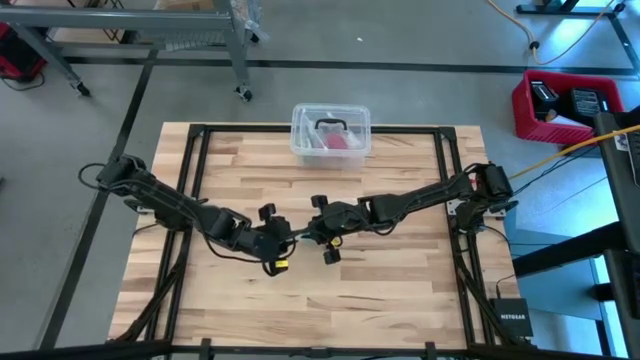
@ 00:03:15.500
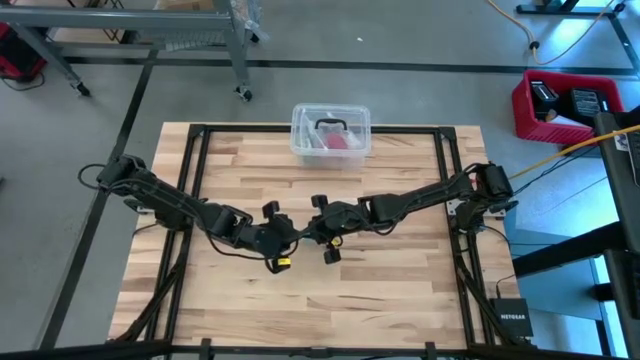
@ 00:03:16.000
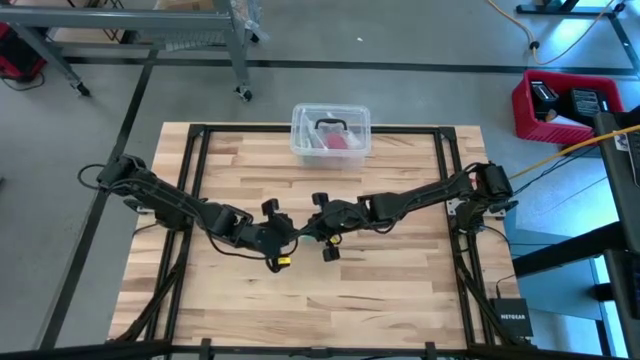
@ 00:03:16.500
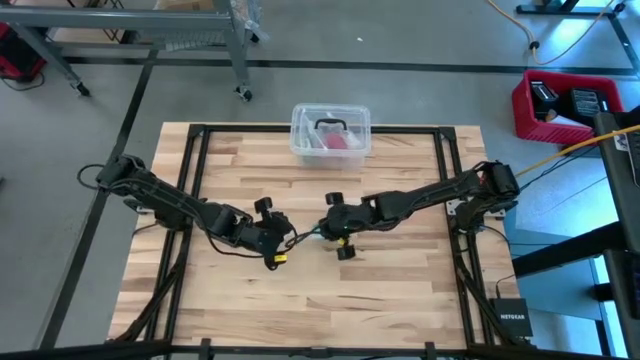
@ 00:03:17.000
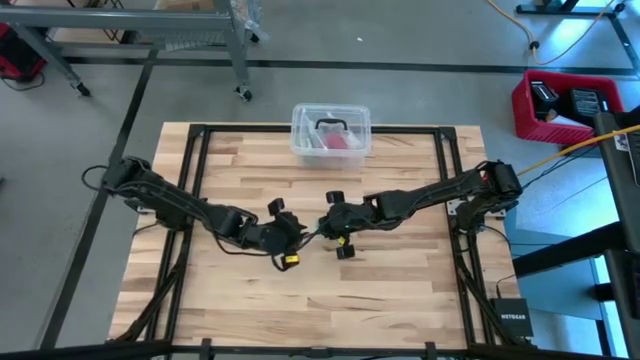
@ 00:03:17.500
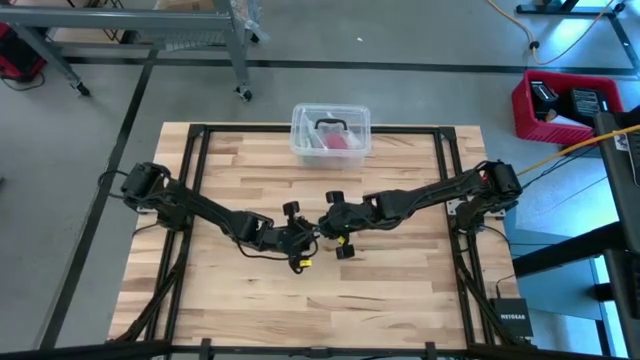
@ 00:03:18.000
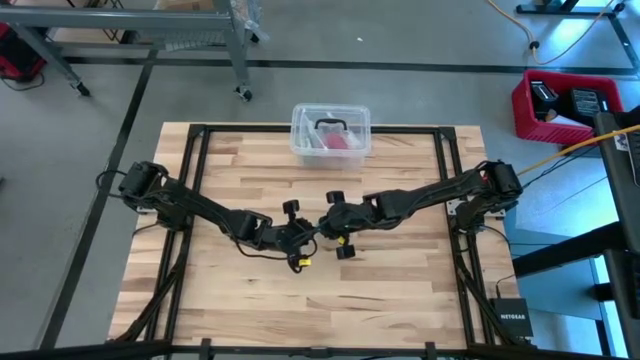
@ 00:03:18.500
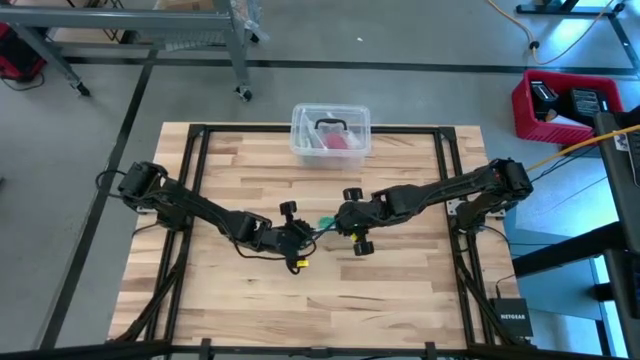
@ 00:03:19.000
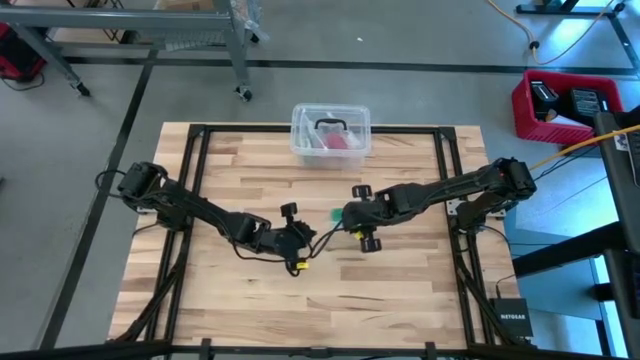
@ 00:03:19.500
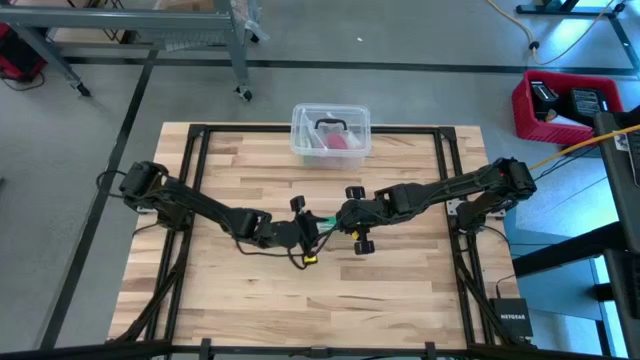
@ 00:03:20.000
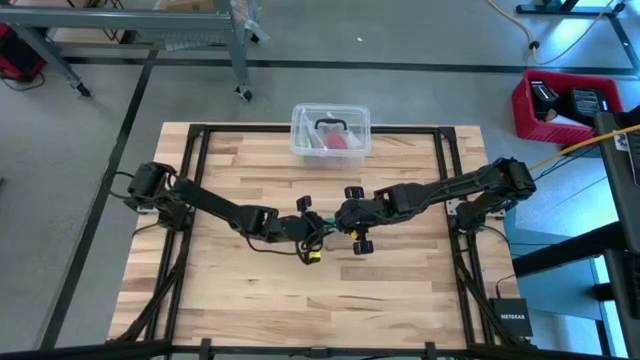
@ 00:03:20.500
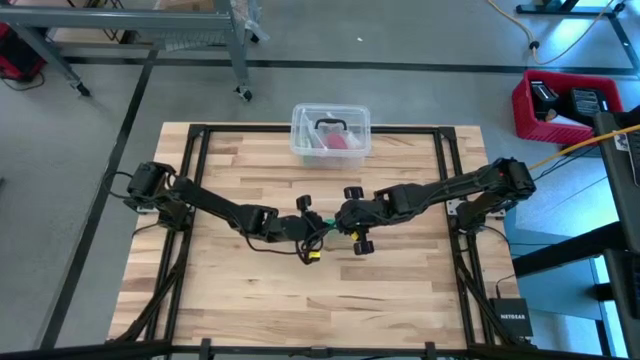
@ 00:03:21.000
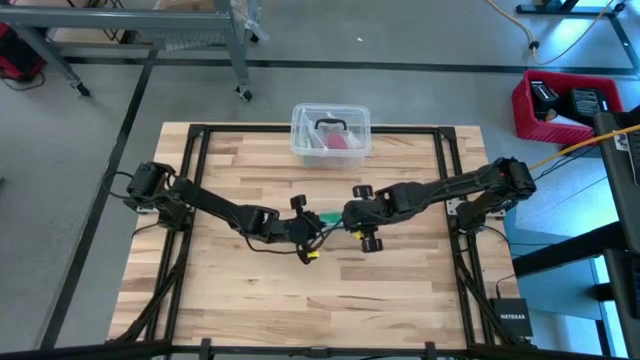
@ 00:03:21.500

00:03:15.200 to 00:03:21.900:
Task: Roll bandage
Close the transparent zip bag

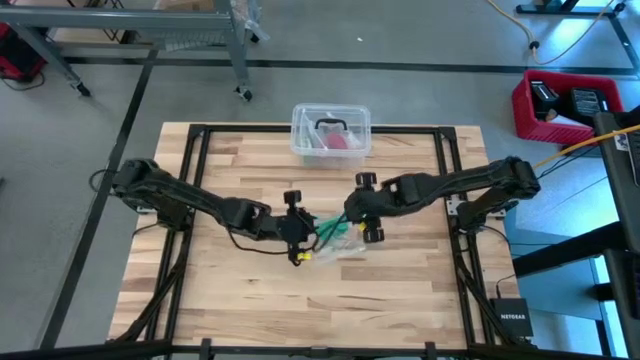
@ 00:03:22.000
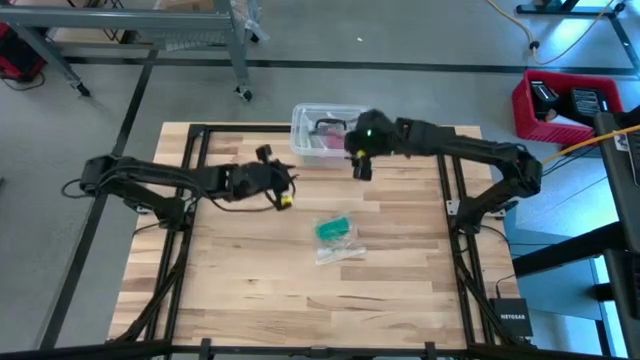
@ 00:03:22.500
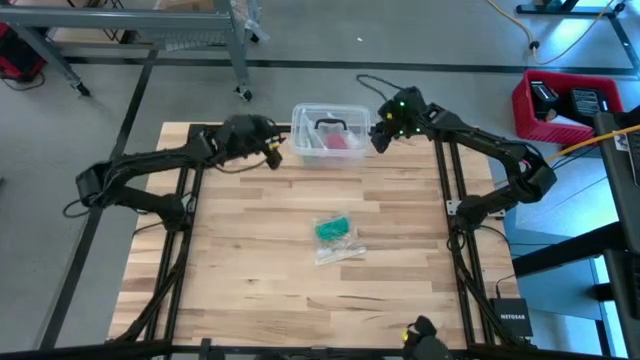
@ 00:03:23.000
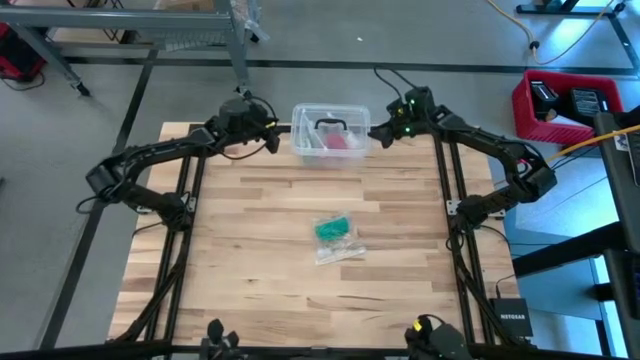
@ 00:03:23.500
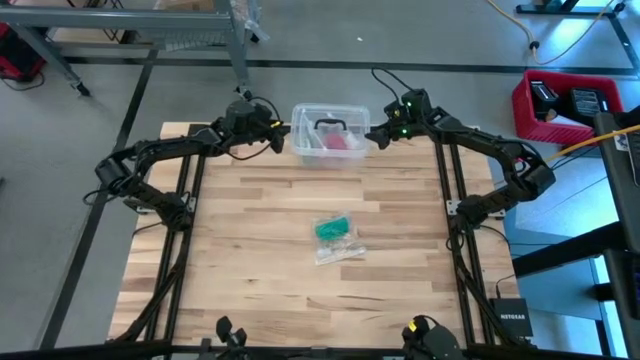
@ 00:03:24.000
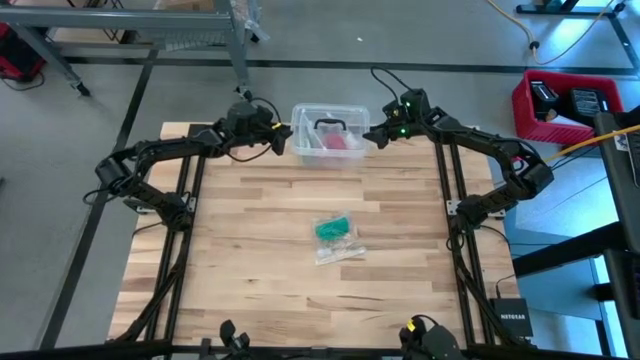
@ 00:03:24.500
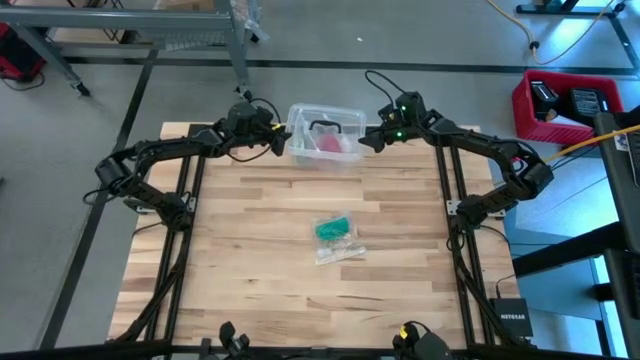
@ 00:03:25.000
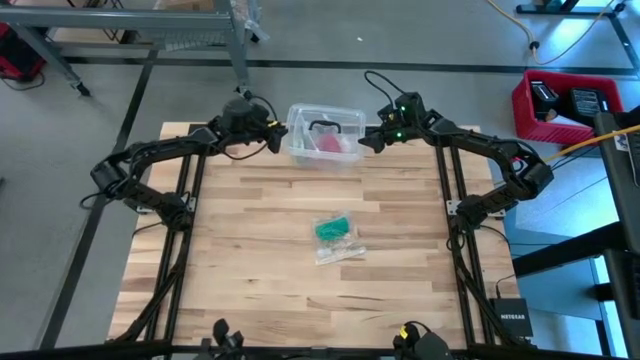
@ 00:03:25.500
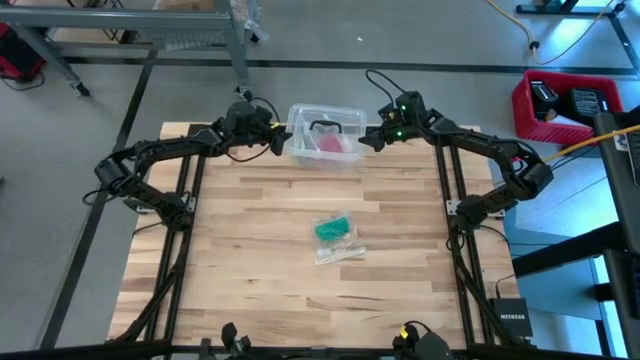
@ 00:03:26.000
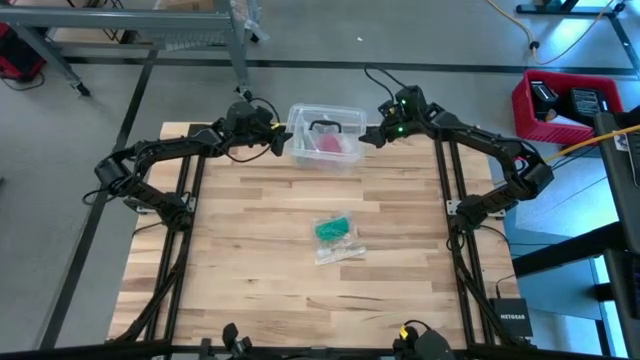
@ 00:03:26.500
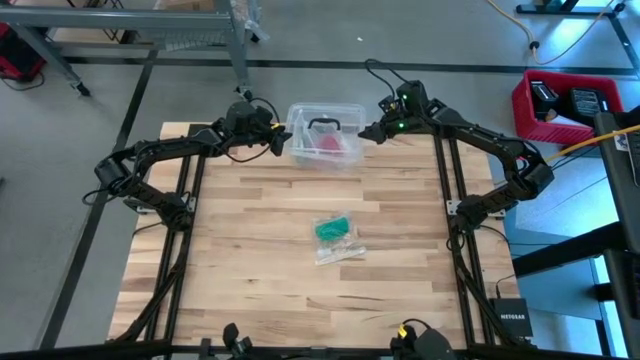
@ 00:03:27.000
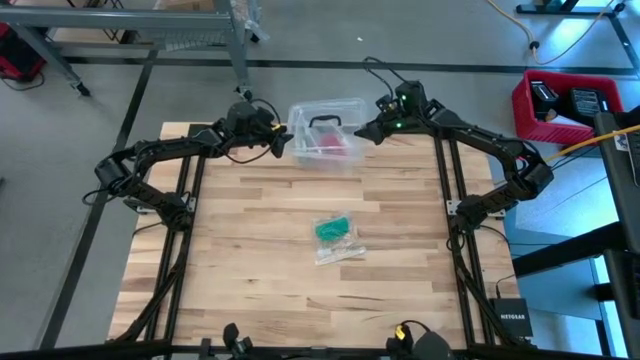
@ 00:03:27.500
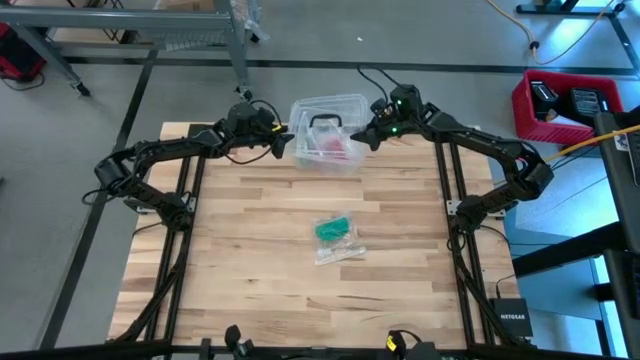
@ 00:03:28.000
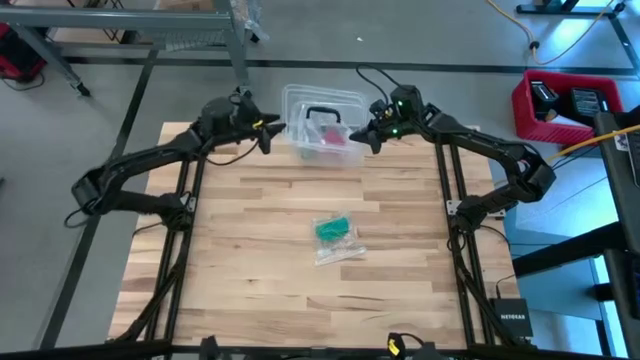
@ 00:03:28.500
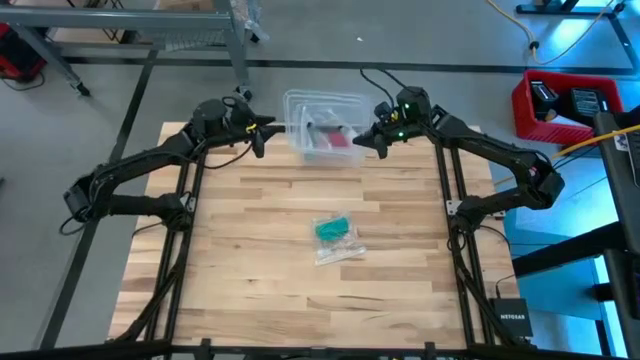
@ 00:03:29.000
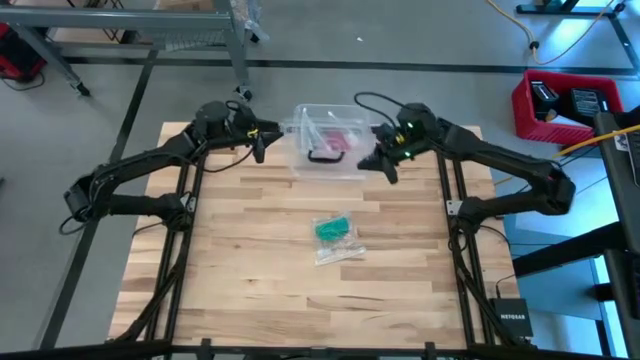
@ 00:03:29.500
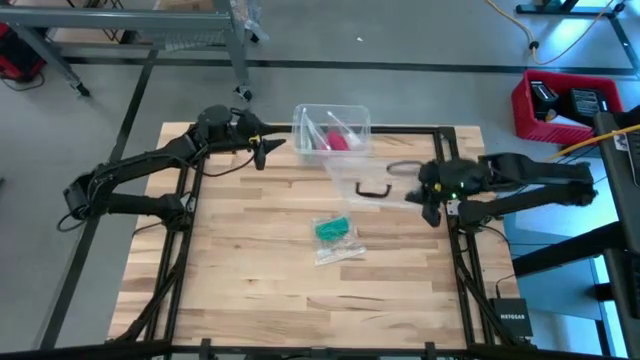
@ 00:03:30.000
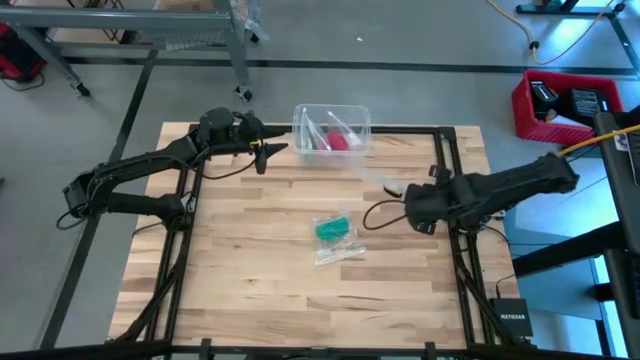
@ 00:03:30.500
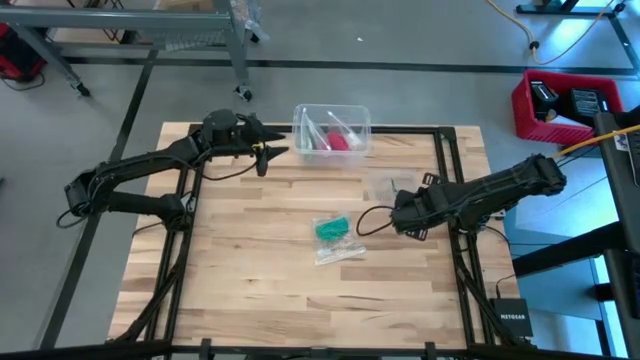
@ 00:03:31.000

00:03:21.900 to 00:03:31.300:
Open the transparent container

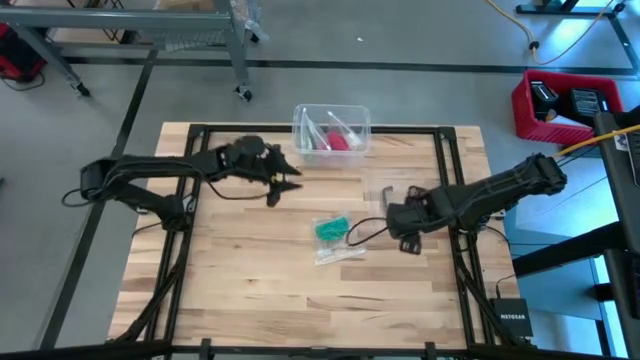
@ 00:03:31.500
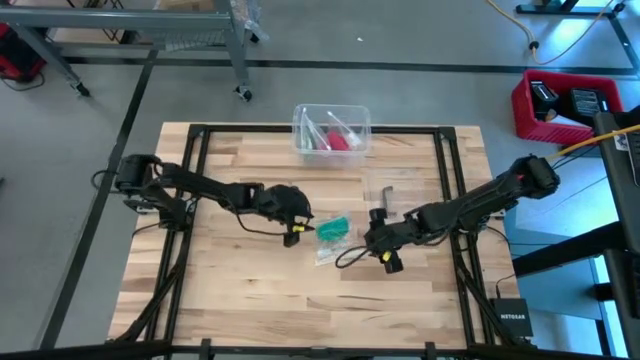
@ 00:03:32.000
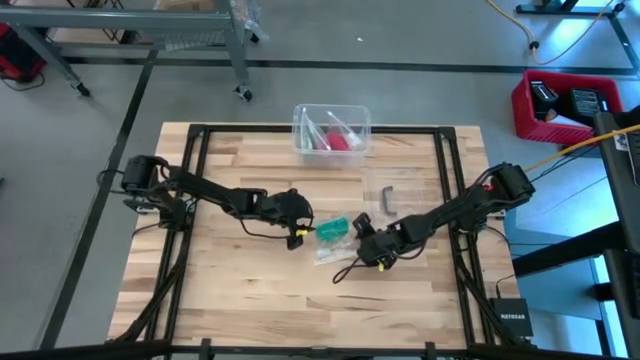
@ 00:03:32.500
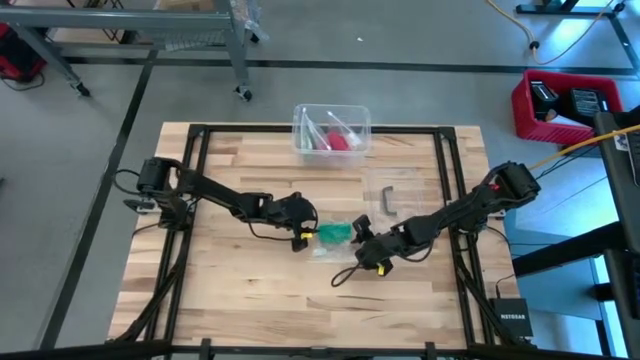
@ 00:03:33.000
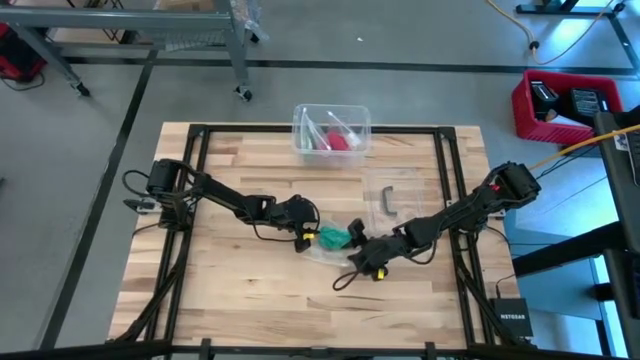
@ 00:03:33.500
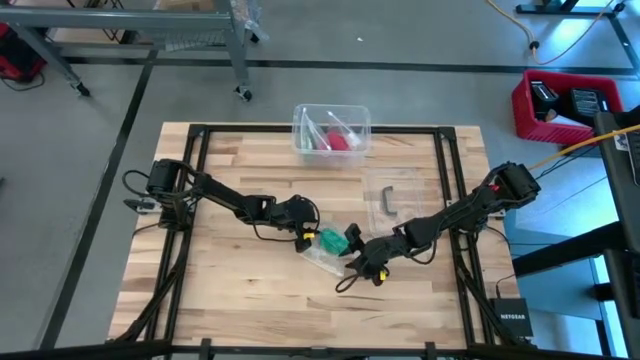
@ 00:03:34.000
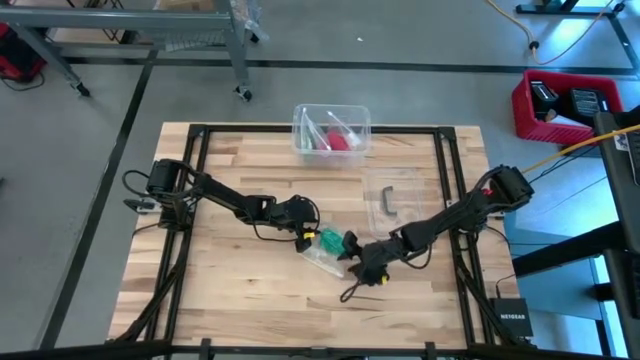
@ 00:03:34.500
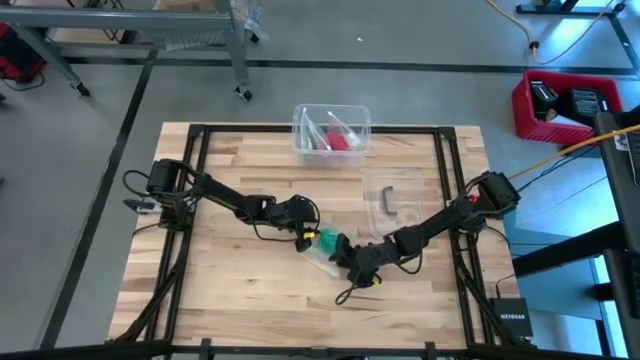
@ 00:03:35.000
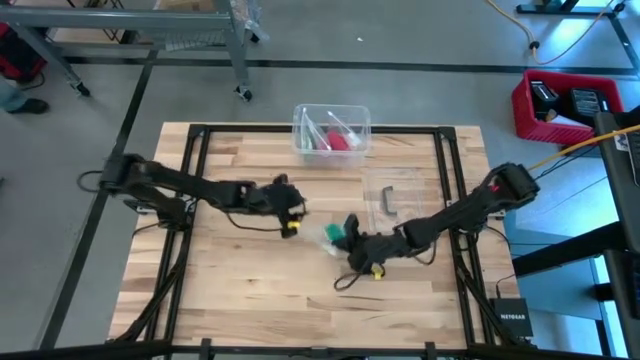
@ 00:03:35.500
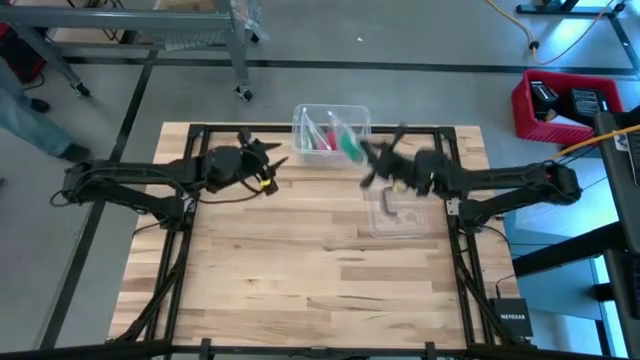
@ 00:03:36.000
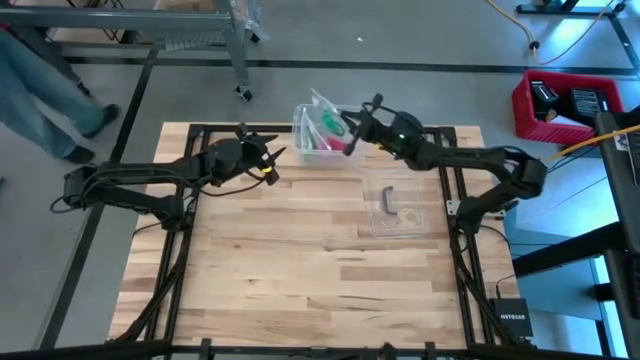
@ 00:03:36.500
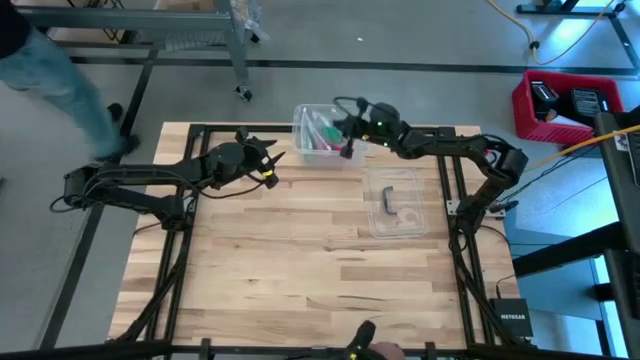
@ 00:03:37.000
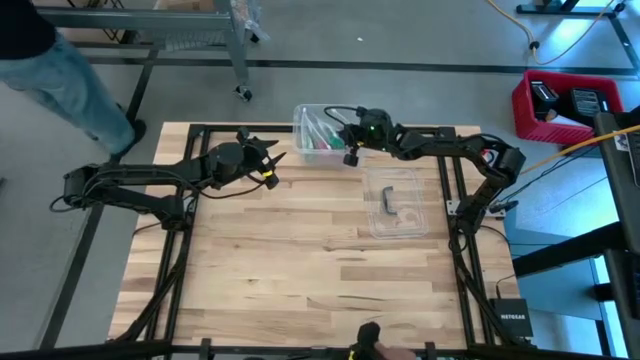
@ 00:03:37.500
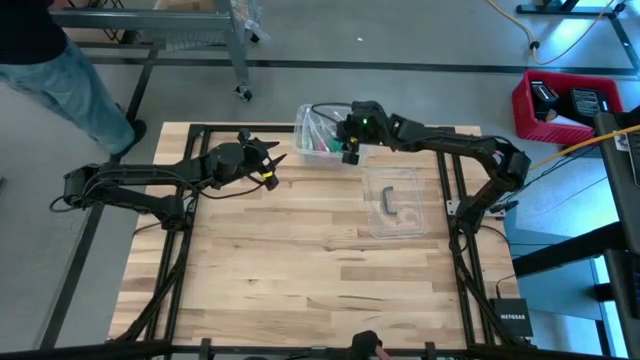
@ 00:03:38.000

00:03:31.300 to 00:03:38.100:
Put the packed rolled green bandage into the transparent container
